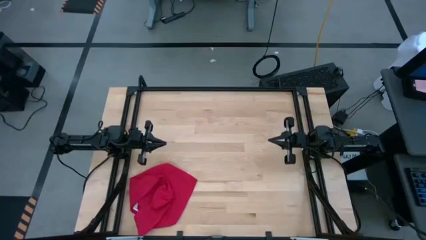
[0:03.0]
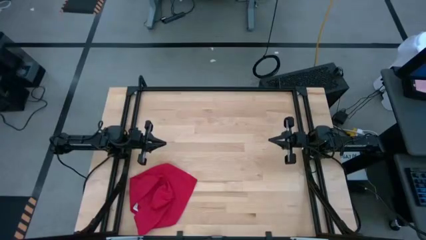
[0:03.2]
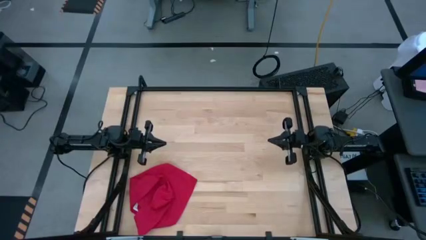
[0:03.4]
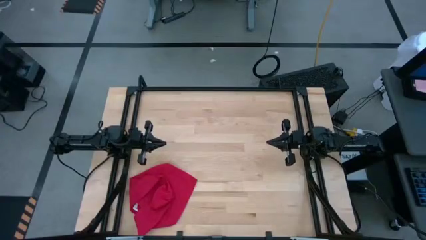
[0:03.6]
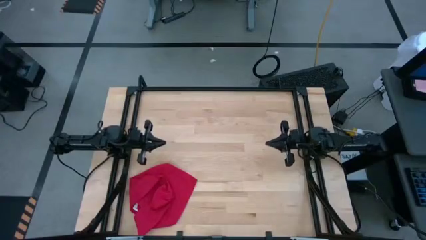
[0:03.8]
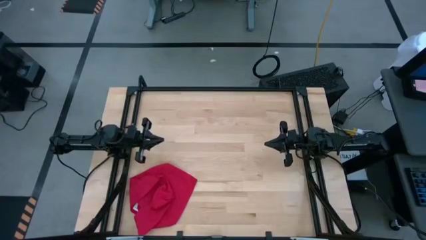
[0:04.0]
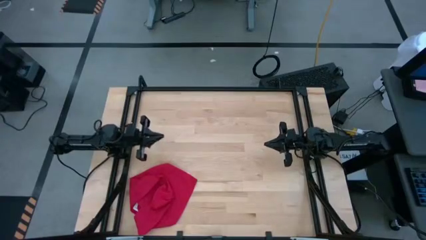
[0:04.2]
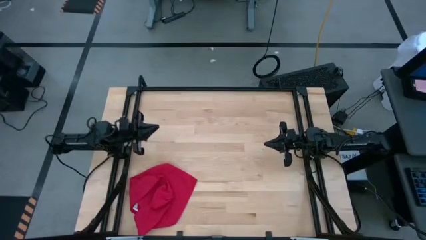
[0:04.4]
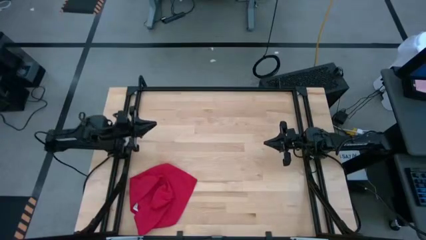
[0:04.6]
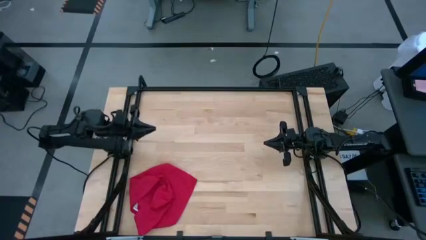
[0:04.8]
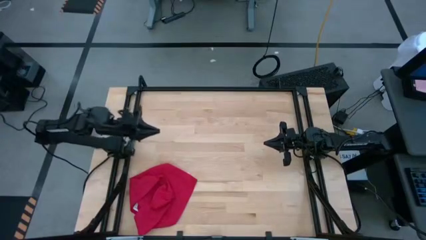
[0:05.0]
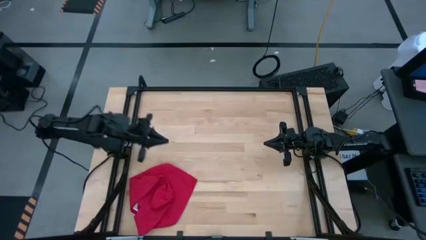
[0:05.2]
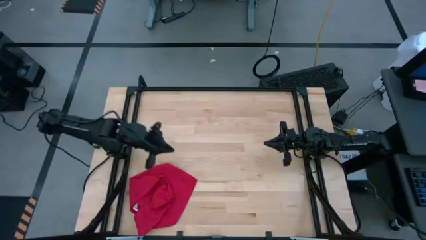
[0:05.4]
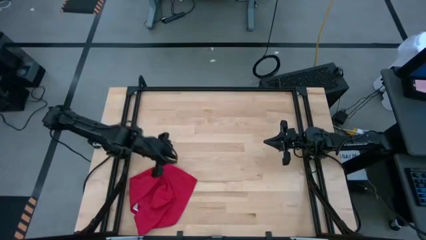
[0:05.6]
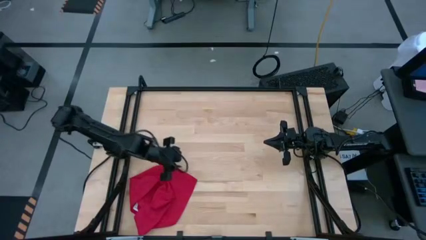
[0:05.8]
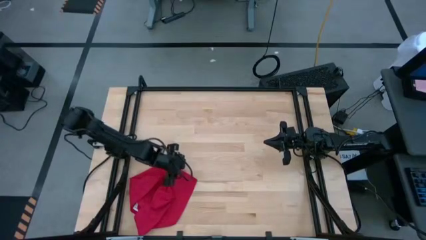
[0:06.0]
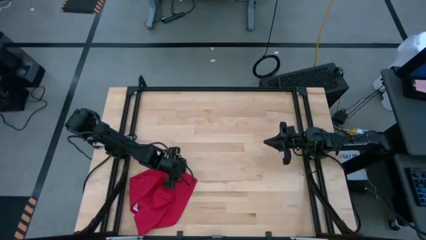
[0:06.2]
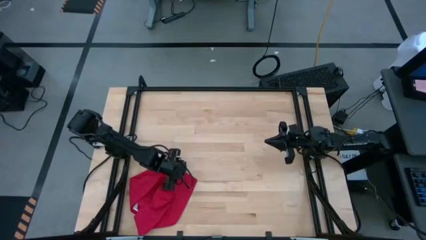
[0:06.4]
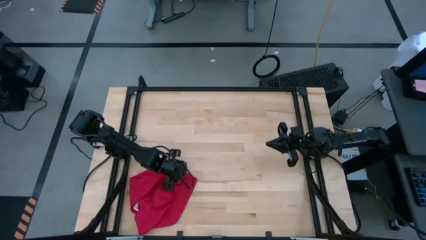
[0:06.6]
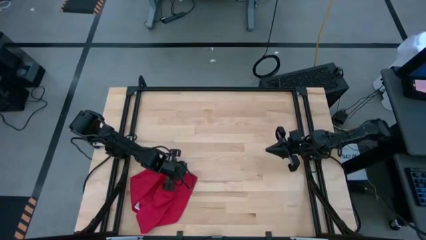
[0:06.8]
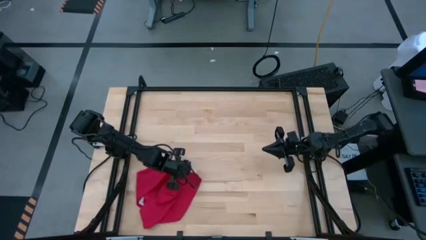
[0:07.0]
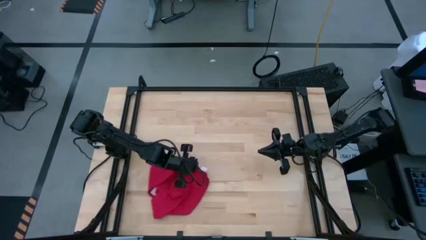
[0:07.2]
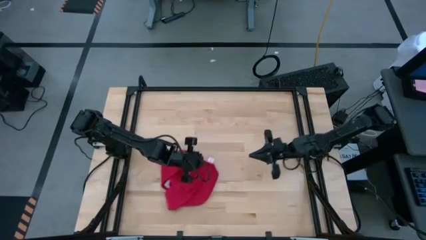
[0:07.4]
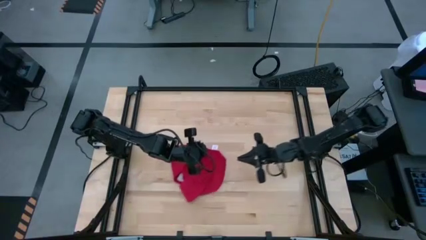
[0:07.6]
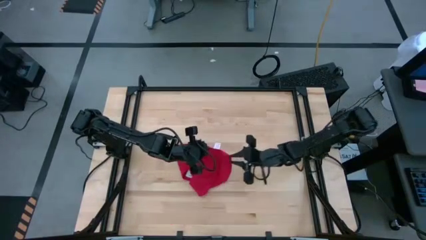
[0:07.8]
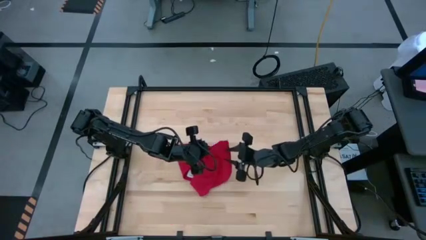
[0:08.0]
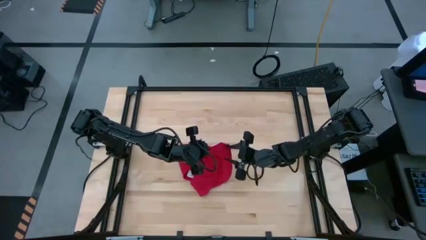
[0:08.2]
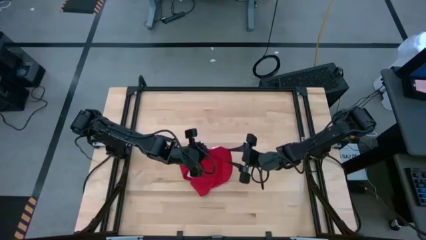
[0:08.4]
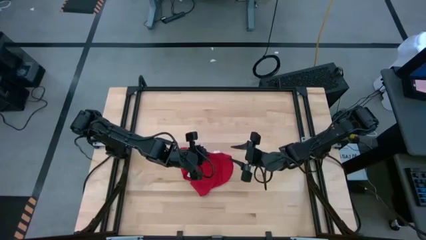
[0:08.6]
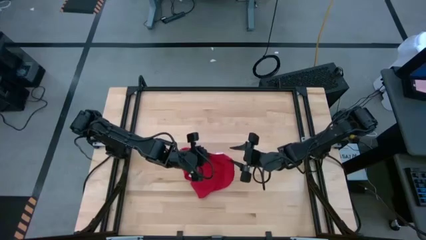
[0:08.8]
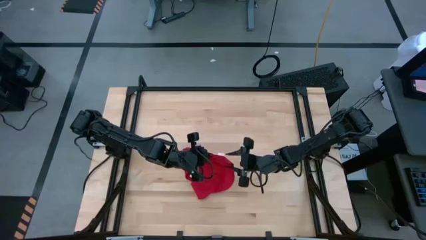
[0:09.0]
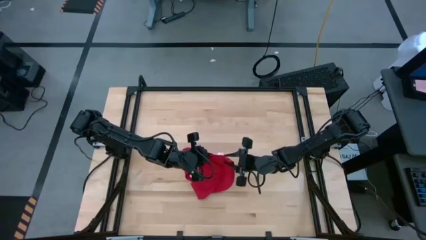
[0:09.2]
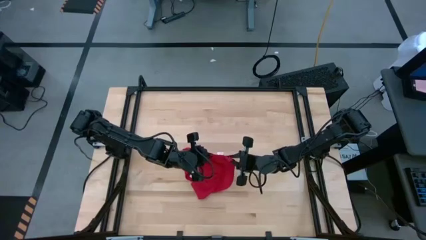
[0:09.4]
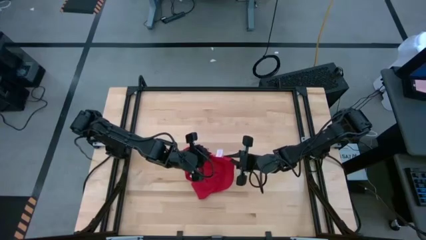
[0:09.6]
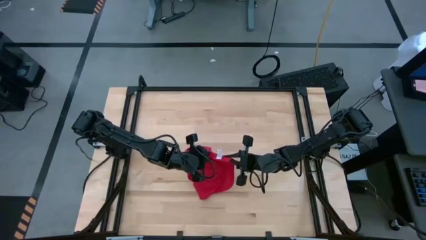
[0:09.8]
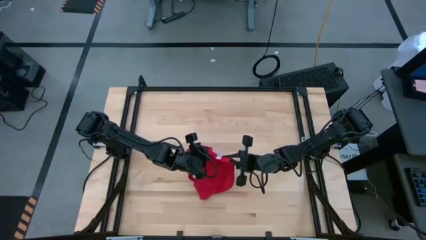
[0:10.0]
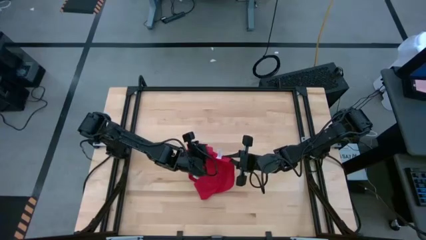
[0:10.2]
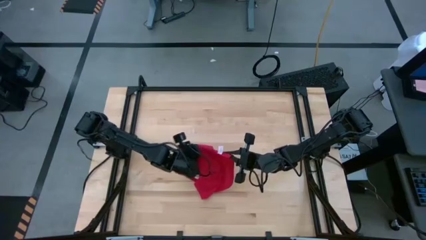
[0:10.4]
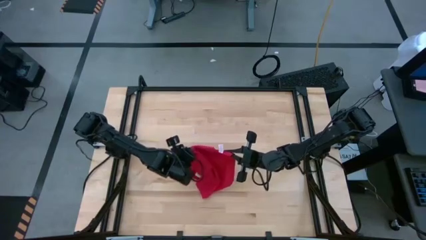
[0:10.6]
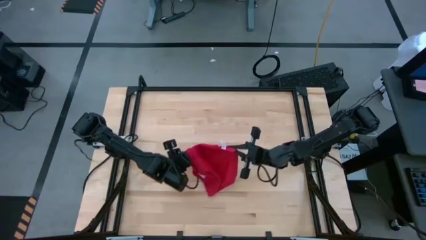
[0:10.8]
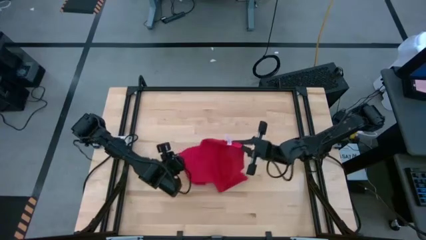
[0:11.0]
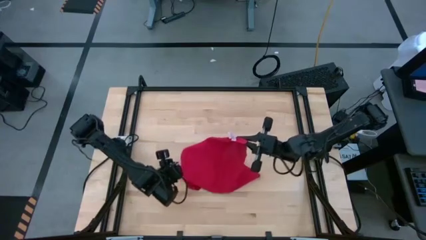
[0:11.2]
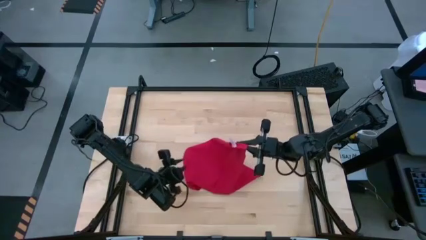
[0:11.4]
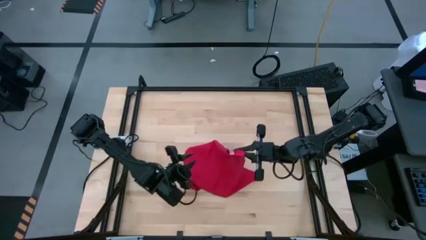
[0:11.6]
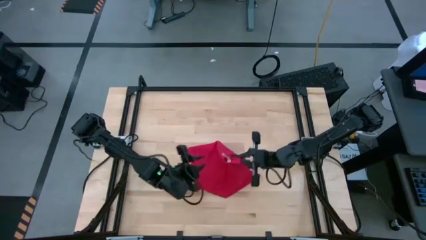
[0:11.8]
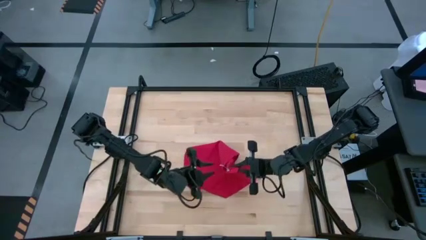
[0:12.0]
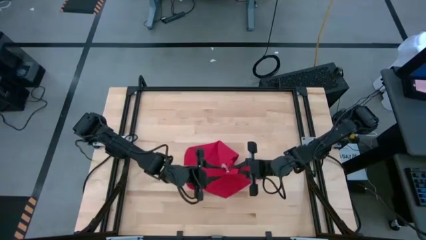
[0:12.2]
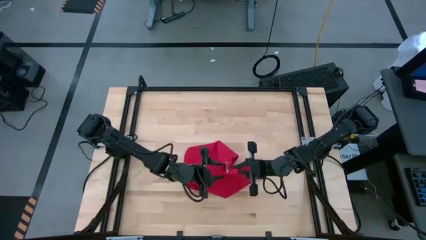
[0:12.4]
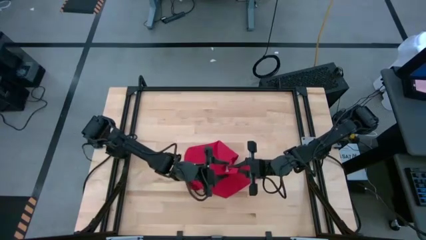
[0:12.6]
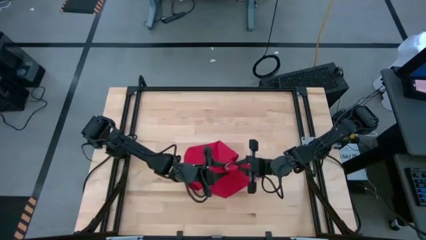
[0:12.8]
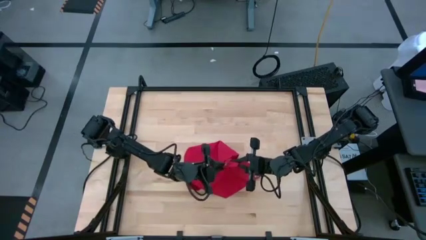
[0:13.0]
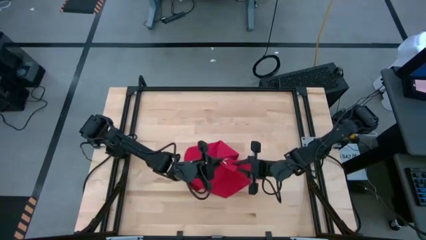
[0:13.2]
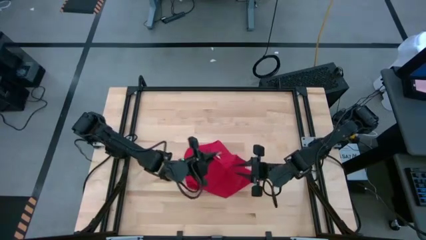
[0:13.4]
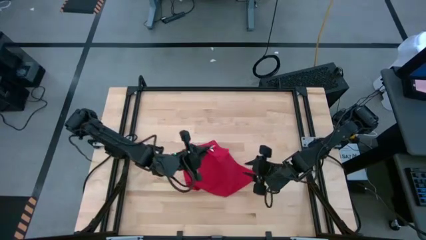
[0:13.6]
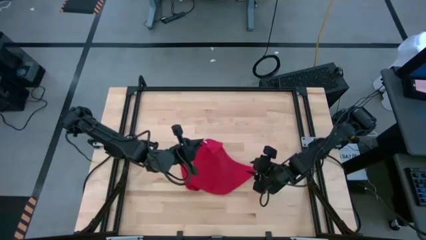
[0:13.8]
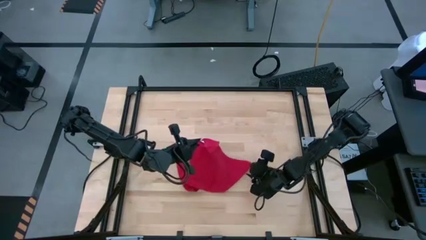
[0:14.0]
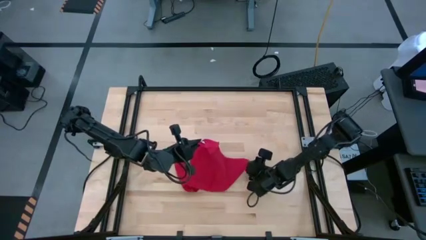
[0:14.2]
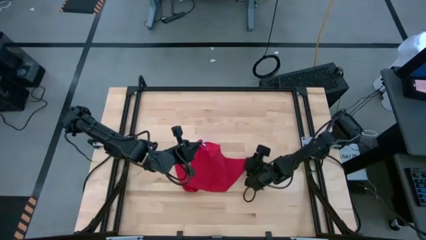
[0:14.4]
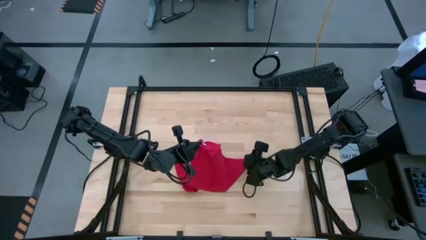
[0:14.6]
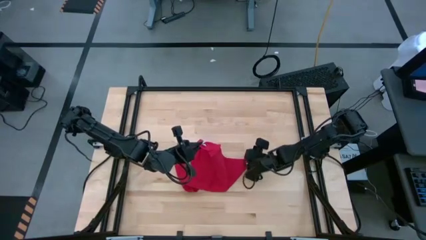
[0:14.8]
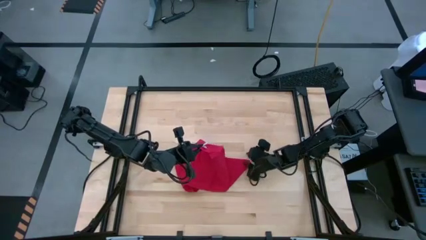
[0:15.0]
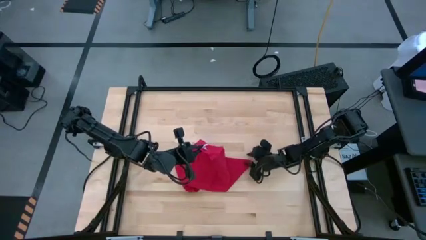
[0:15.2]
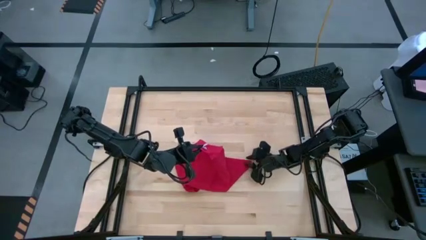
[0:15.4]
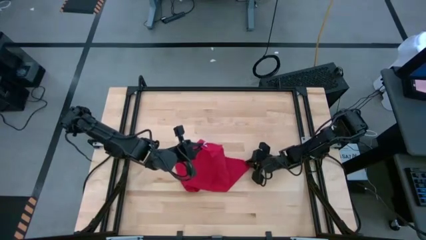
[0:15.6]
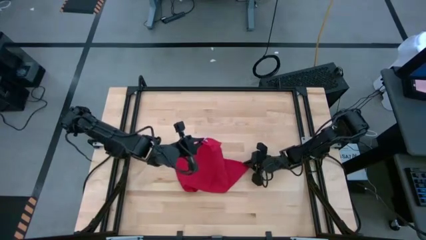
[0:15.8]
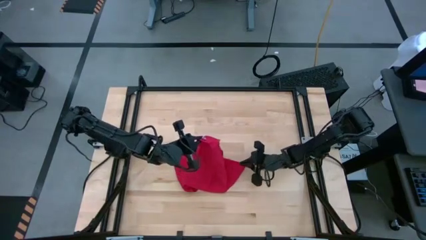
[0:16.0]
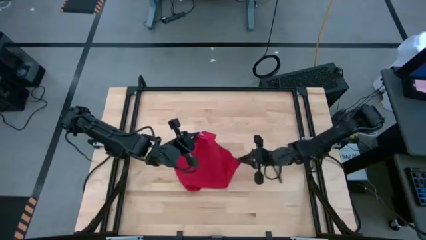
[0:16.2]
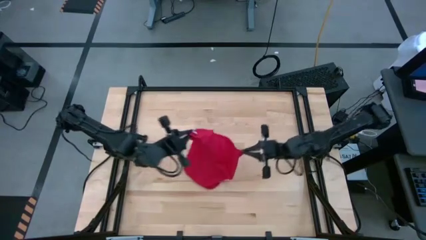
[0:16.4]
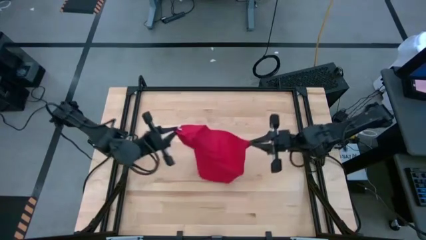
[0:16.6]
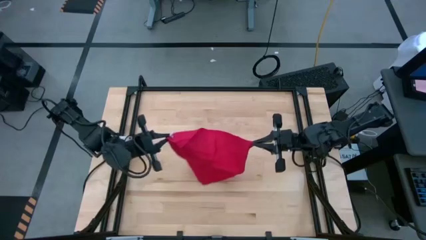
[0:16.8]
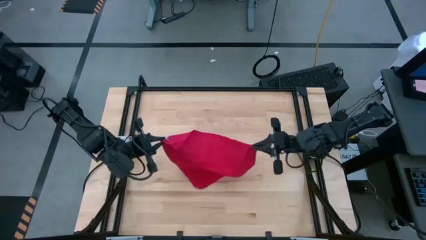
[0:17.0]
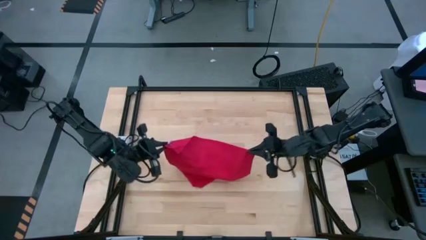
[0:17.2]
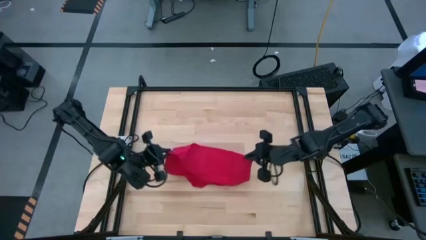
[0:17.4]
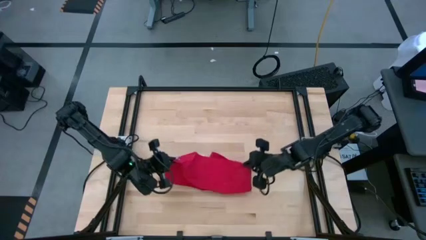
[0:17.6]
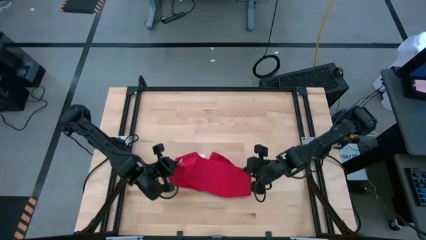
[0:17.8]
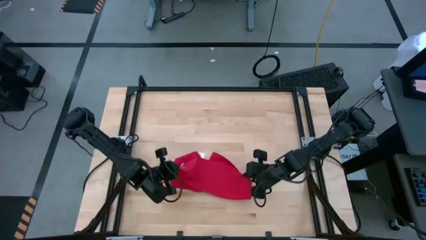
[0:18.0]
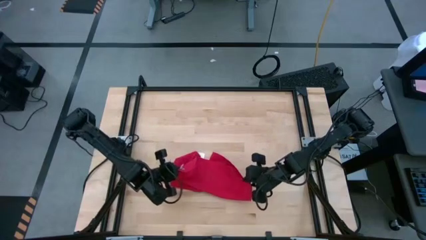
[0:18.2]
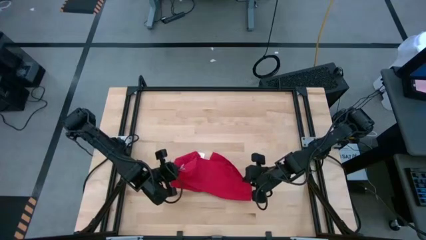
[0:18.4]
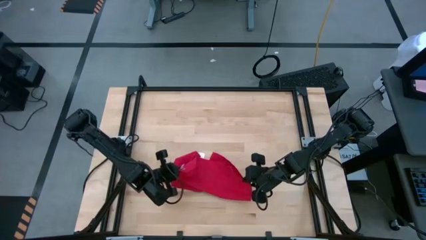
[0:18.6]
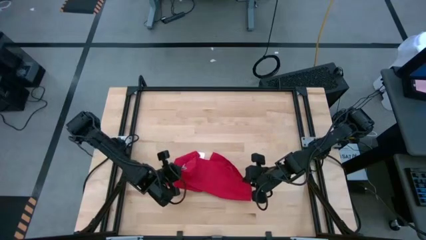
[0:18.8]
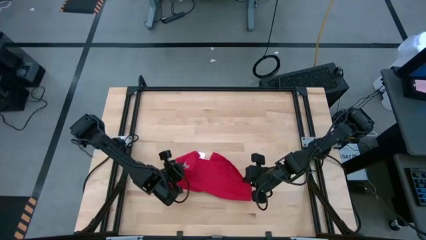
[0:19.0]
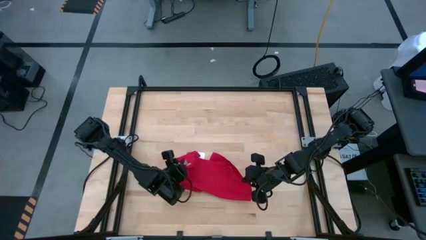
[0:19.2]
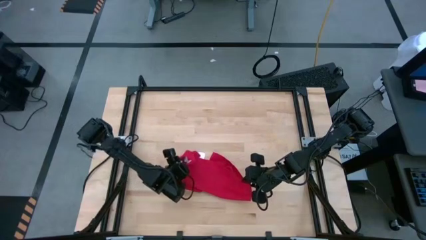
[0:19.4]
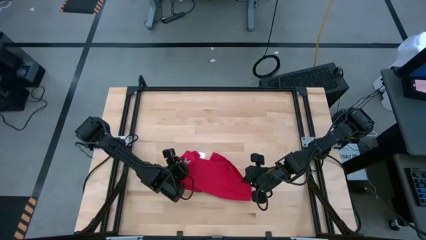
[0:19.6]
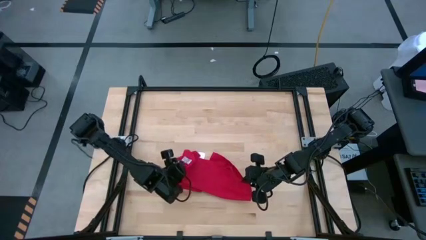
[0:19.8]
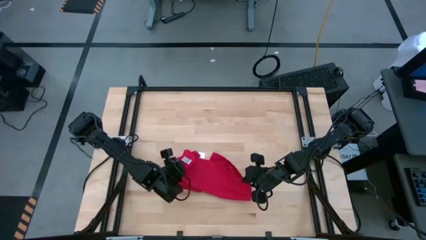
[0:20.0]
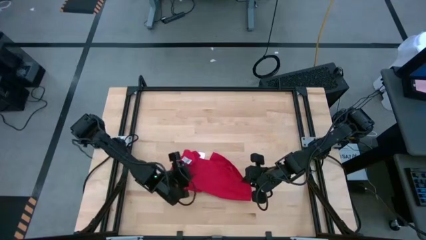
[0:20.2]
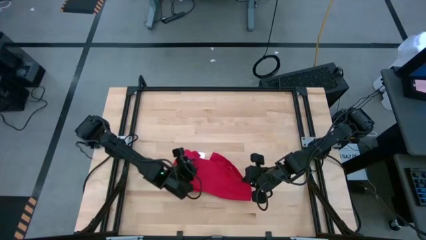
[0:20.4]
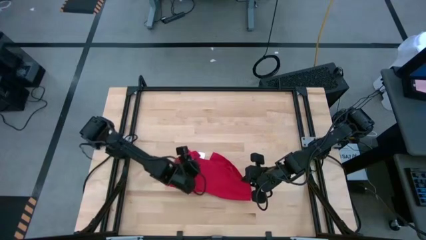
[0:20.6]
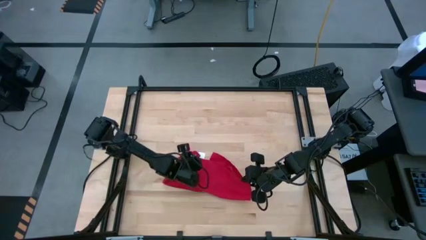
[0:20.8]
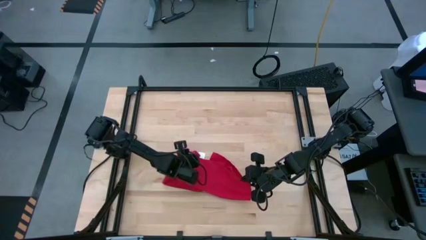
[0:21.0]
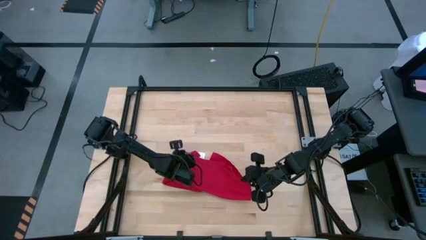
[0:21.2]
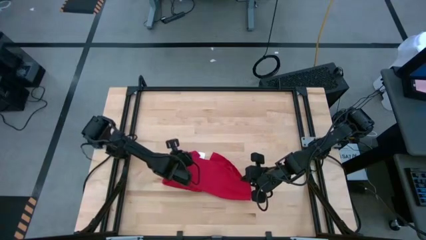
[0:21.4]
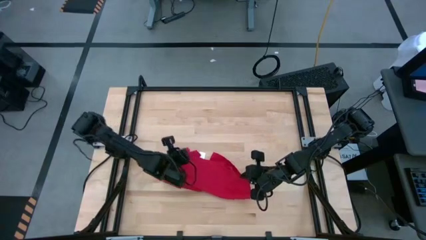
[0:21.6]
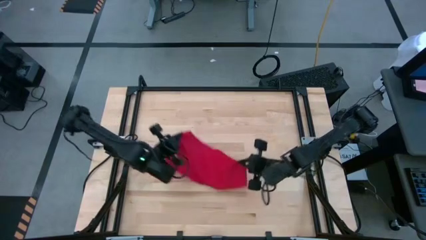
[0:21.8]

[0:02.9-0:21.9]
Task: Roll towel
Roll the red towel
